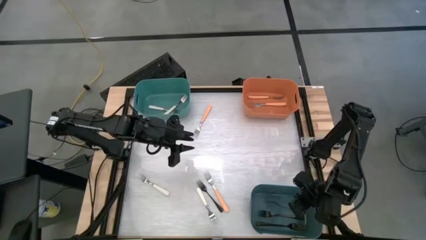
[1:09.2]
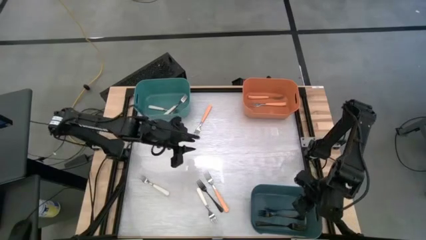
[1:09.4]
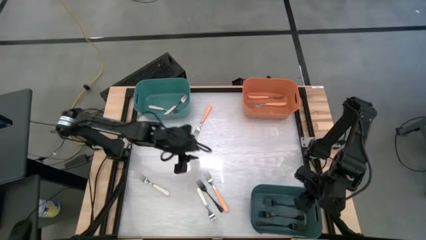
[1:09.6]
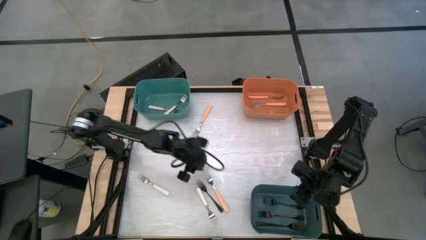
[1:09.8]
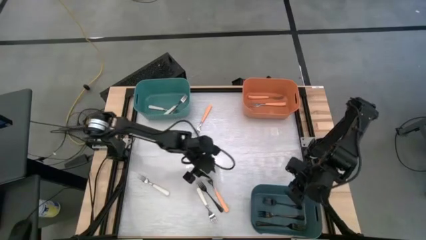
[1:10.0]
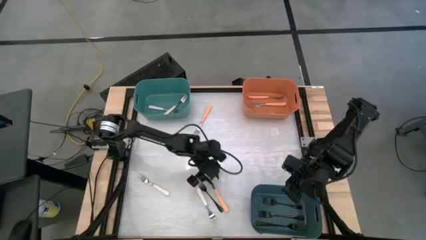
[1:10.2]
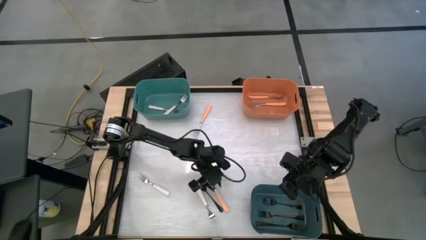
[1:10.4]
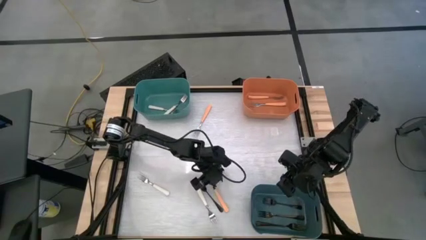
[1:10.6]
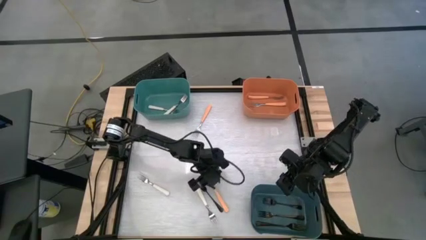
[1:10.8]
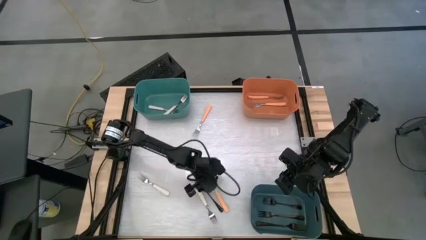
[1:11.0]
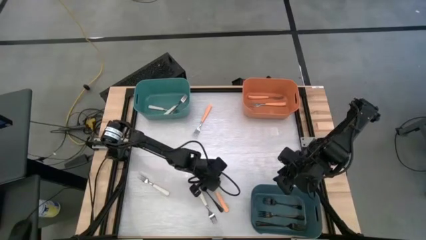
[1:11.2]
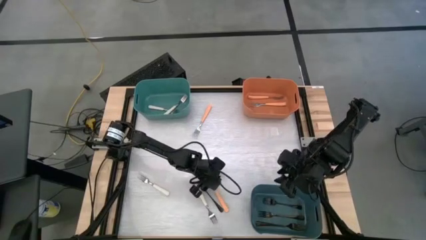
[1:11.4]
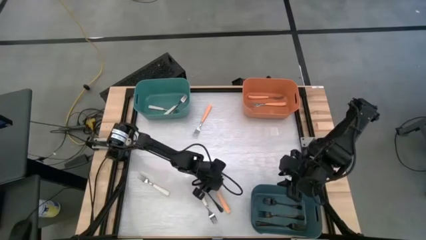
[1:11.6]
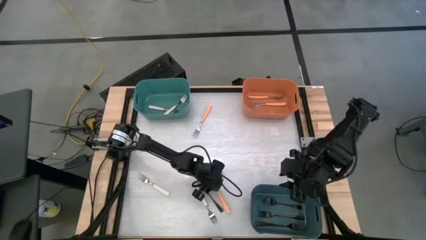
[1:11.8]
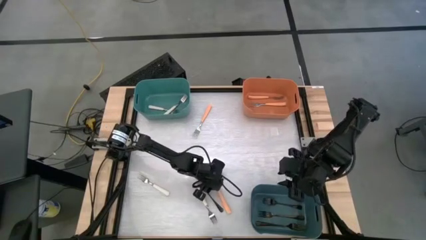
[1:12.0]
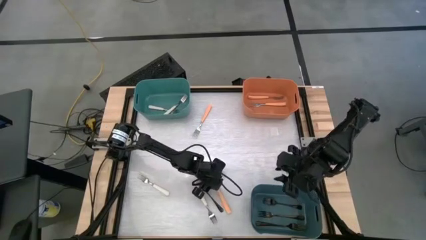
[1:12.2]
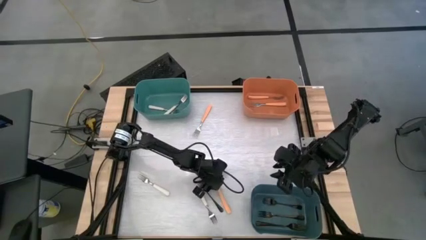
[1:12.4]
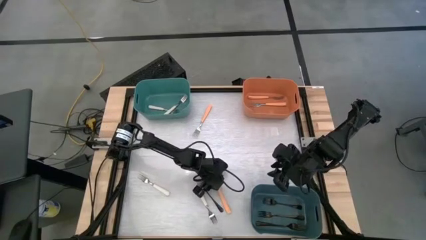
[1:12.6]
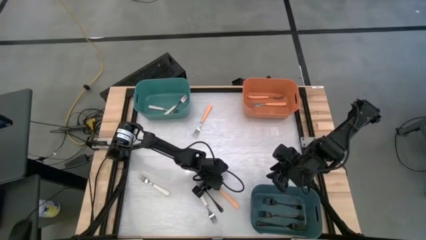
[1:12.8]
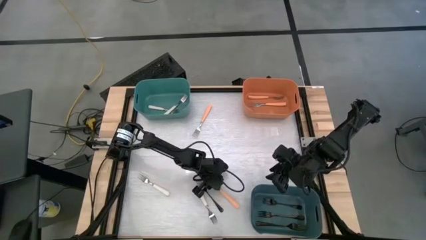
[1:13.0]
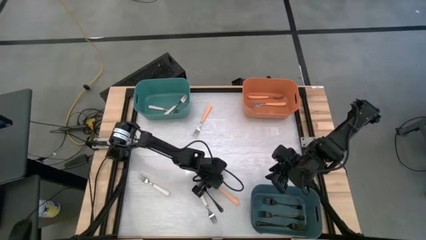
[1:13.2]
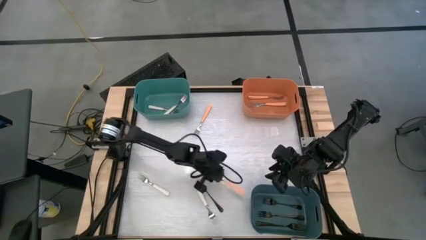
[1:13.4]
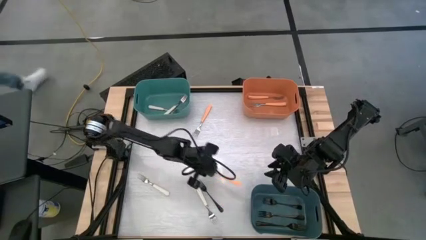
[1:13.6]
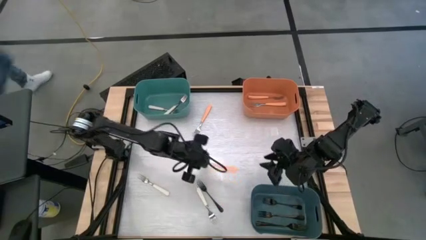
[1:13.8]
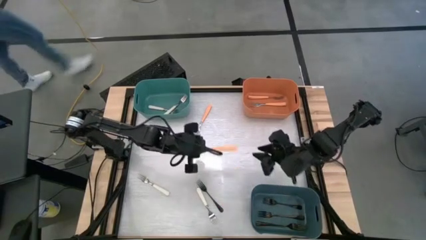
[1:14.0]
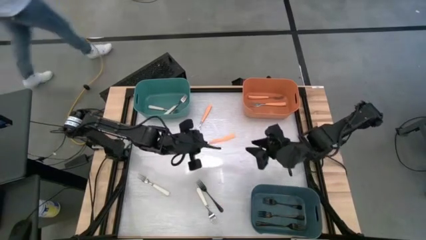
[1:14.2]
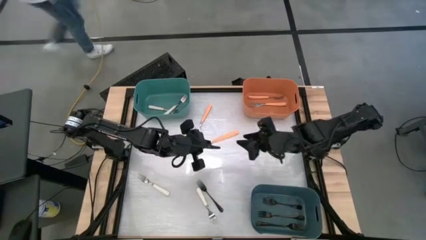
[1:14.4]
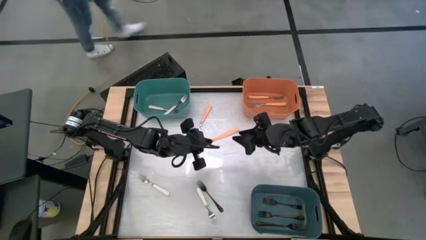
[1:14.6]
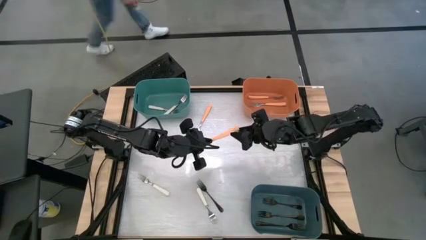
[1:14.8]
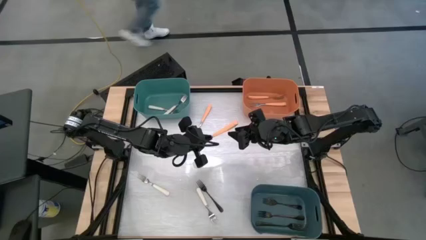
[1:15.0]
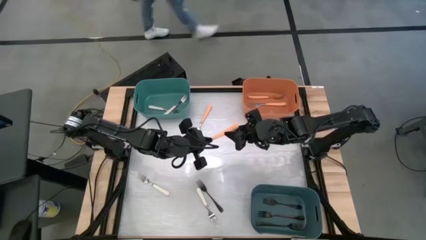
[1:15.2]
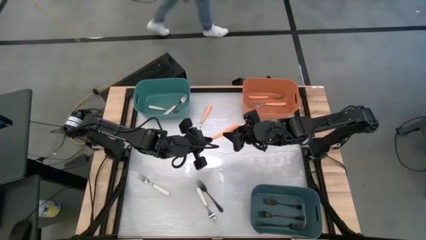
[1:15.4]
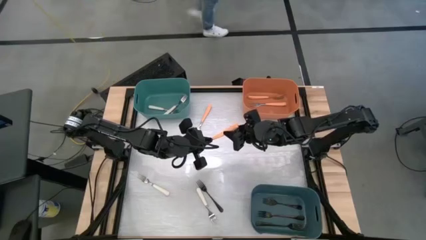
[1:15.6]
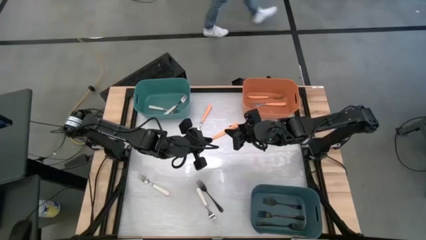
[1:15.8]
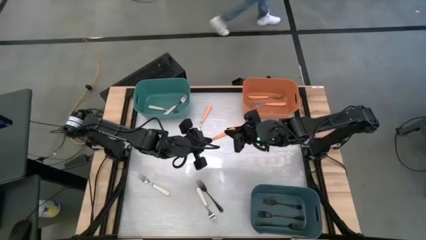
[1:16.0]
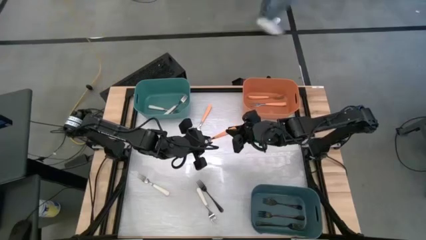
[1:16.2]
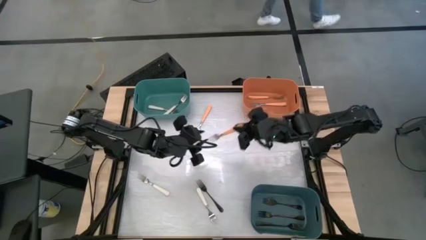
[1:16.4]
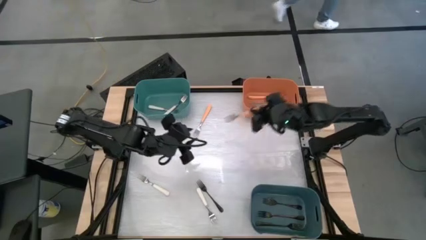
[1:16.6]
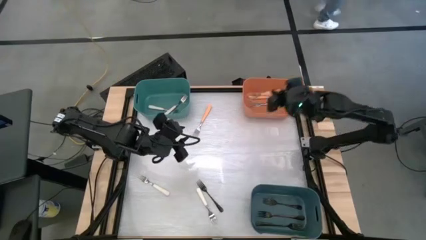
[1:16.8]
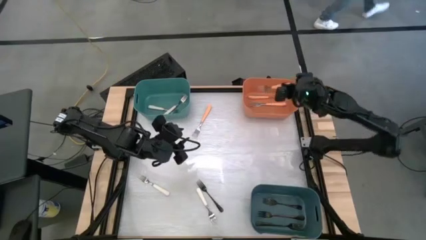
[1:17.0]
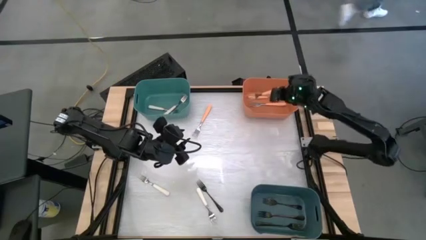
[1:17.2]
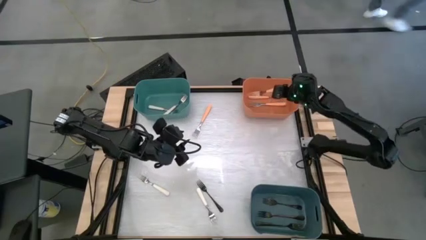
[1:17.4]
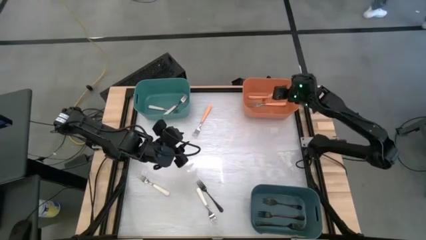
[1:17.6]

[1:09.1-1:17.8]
Task: Sort silverware by color (type)
Put the orange fork into the orange bin

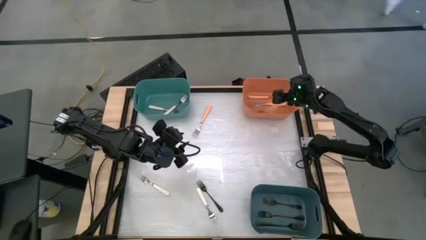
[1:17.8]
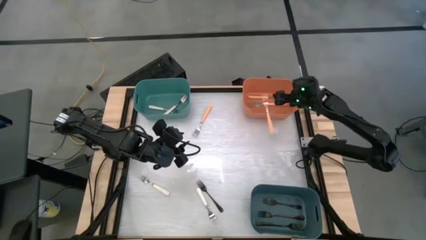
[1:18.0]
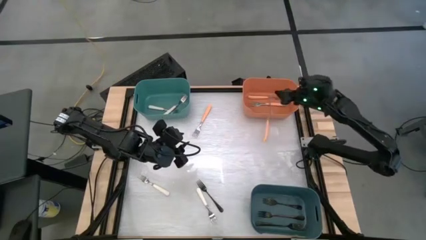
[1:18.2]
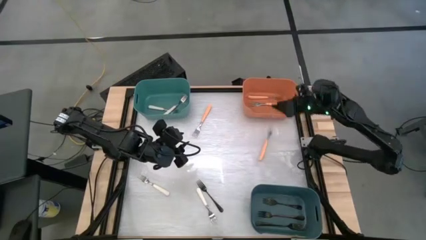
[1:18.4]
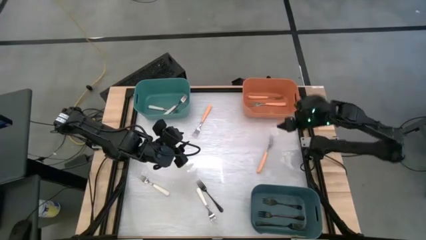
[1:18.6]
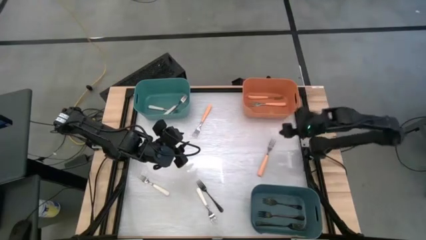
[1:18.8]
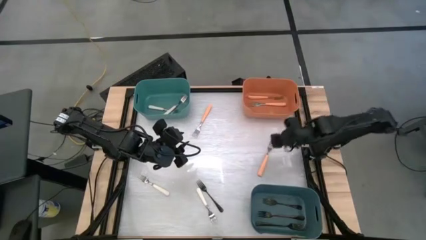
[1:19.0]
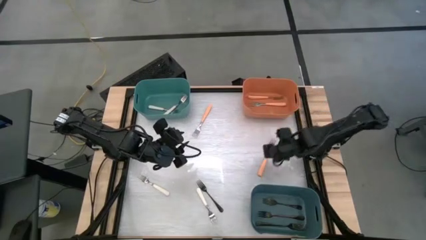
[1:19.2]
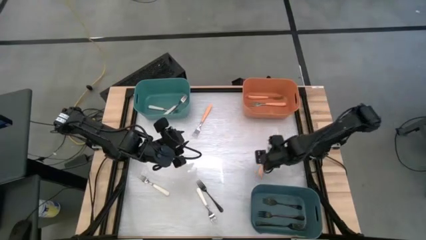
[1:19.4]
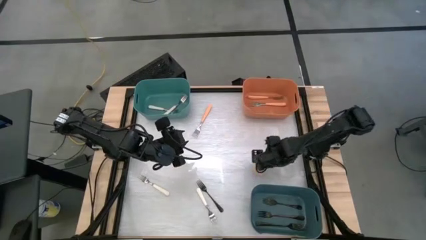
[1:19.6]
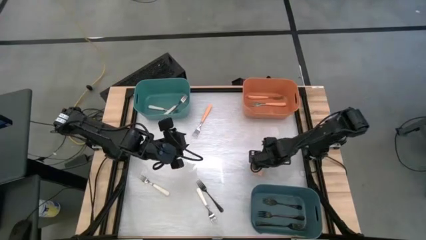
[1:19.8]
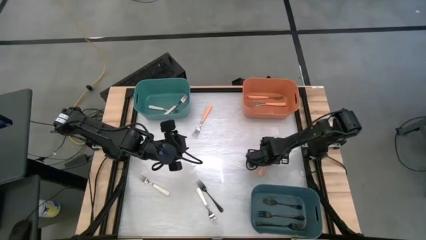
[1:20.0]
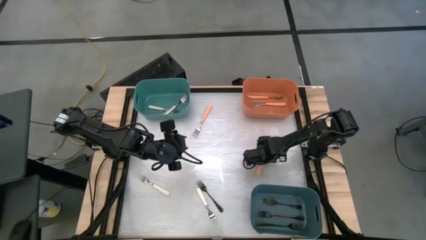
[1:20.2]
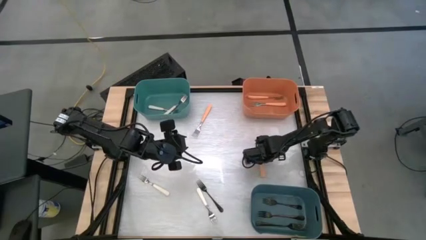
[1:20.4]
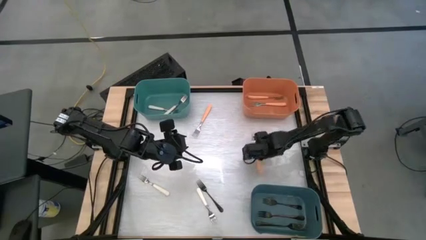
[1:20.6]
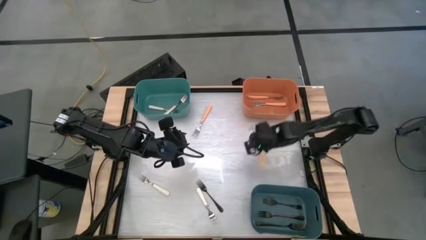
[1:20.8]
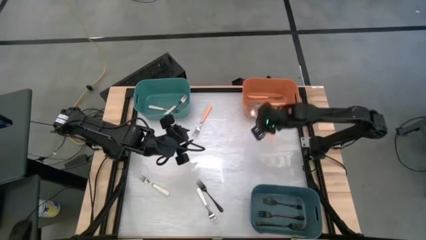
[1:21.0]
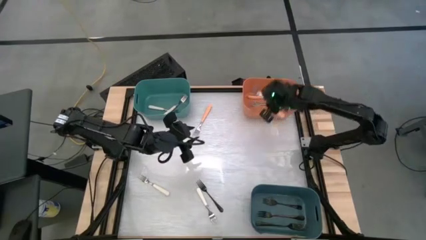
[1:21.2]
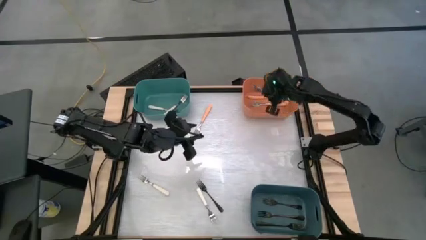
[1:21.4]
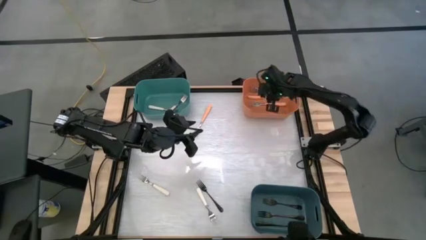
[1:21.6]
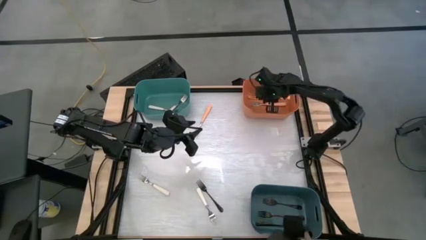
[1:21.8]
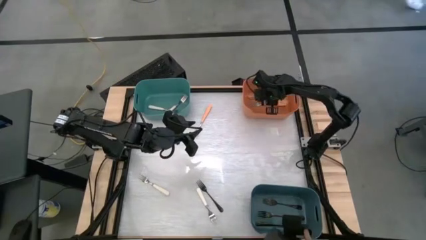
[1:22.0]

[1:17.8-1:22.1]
Put the orange fork into the orange bin

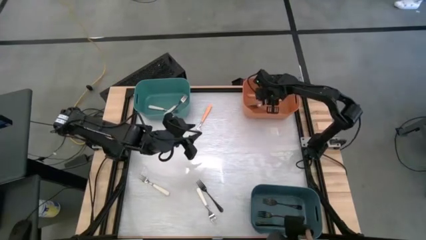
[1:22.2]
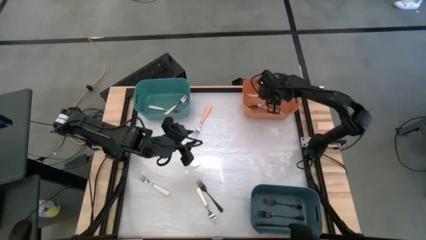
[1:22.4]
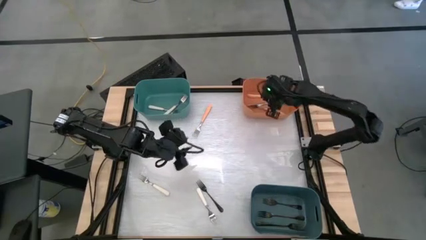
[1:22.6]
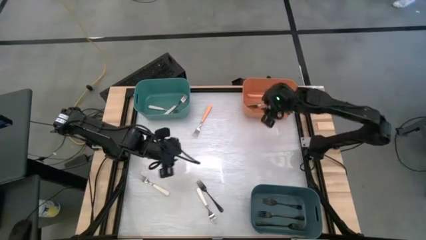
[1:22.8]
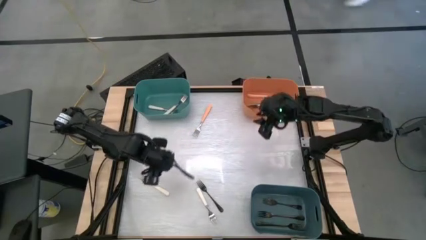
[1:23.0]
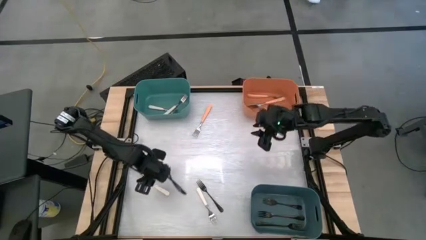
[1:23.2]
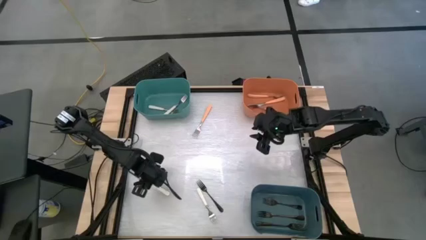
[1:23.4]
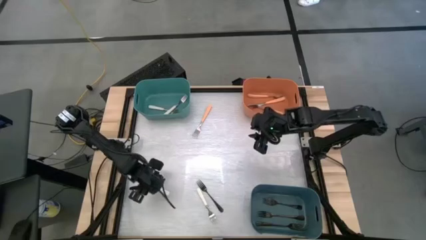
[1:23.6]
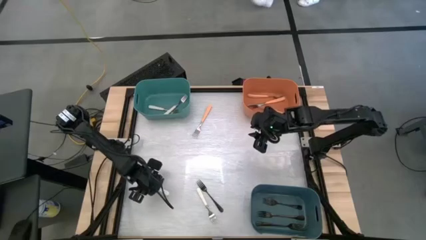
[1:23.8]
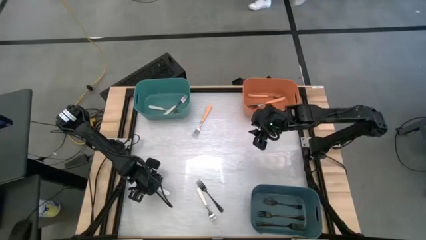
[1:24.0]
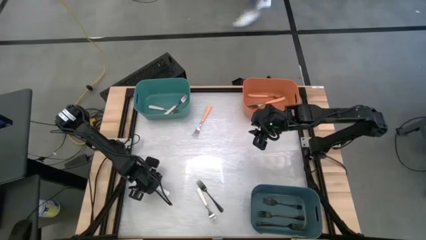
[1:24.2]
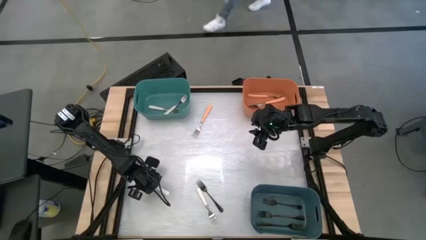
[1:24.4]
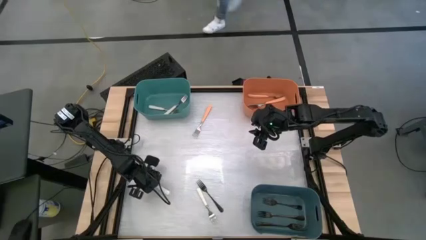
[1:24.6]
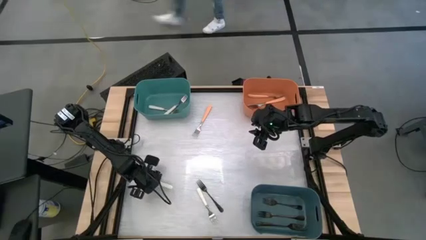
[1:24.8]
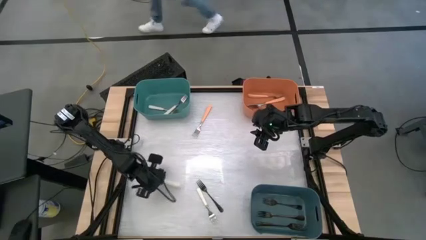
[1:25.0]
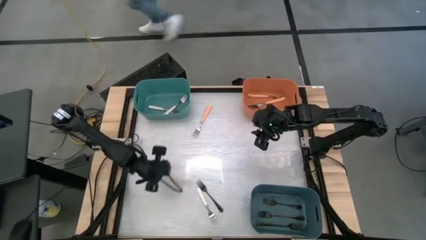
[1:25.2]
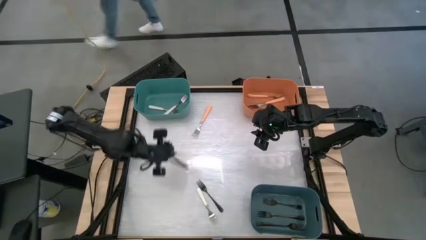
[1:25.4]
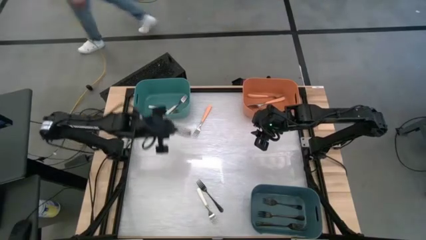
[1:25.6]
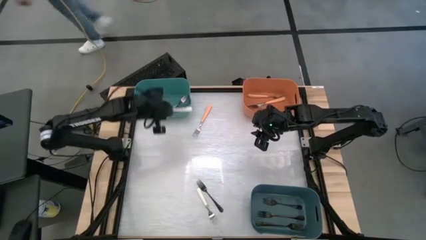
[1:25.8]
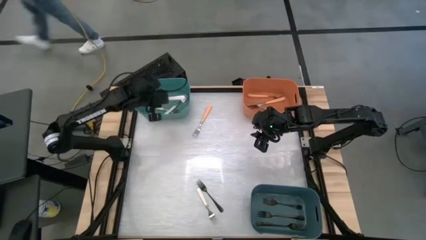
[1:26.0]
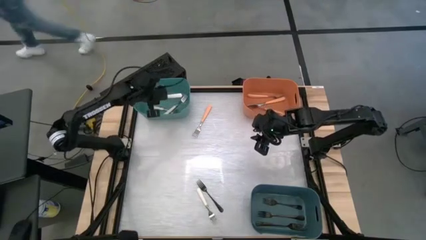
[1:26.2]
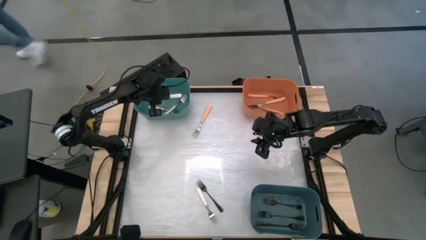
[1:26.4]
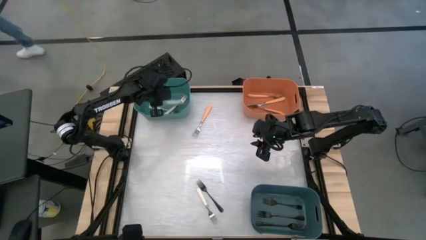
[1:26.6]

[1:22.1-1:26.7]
Put the white fork into the green bin
